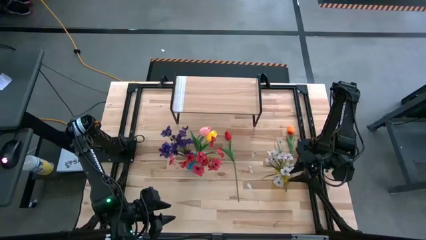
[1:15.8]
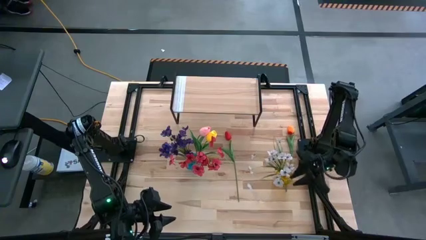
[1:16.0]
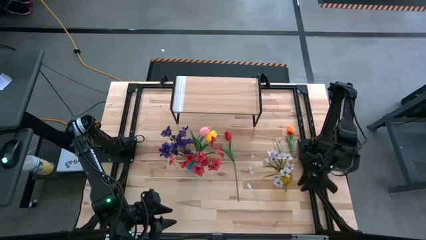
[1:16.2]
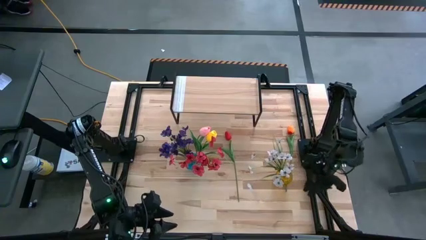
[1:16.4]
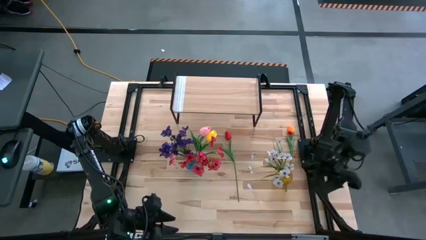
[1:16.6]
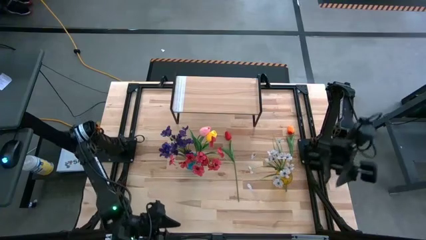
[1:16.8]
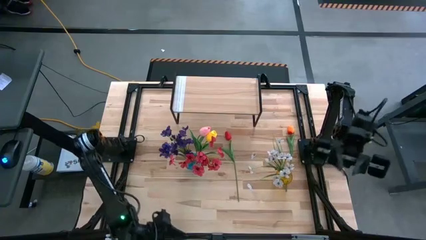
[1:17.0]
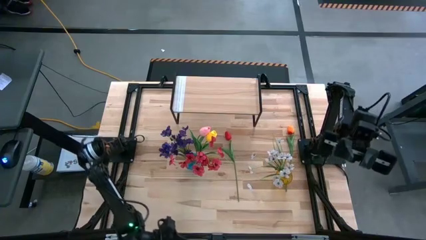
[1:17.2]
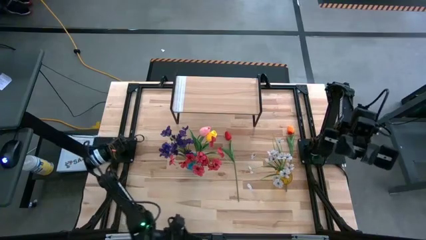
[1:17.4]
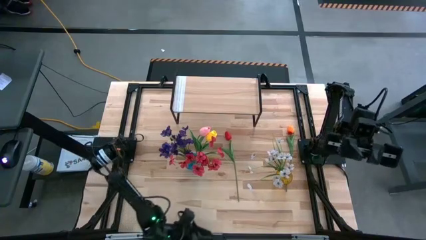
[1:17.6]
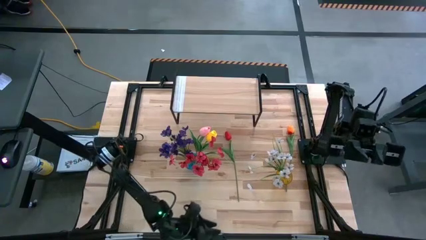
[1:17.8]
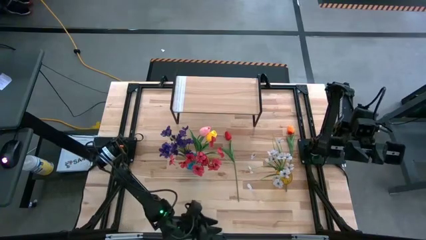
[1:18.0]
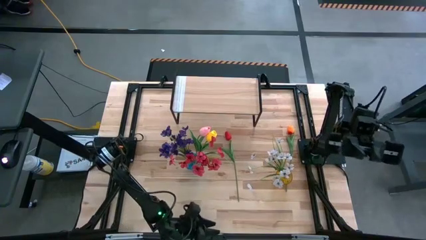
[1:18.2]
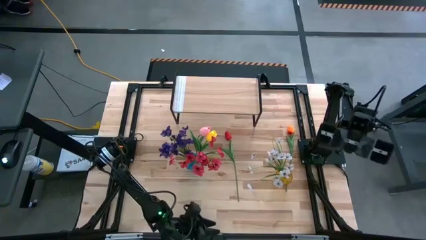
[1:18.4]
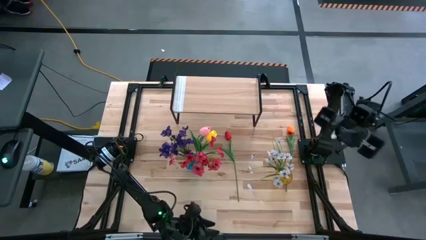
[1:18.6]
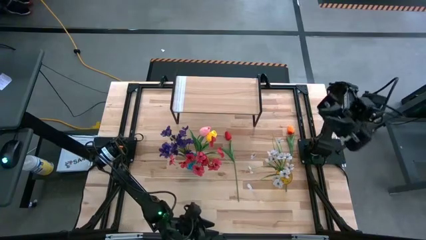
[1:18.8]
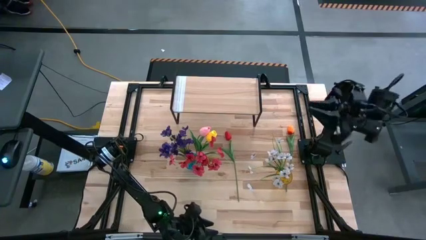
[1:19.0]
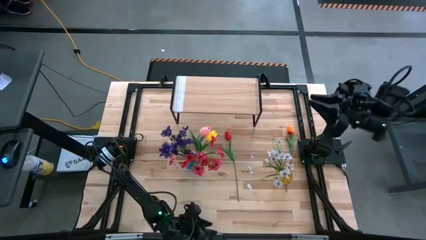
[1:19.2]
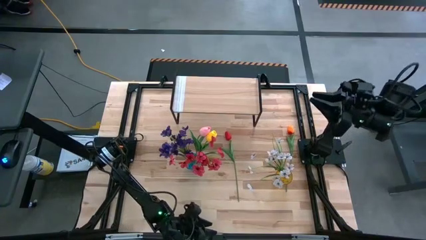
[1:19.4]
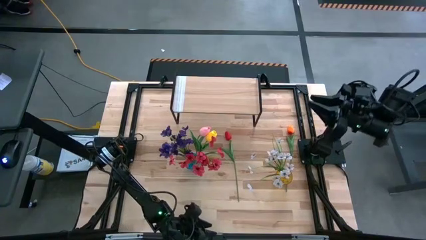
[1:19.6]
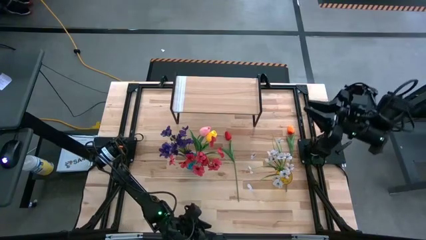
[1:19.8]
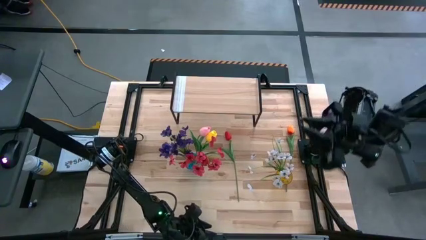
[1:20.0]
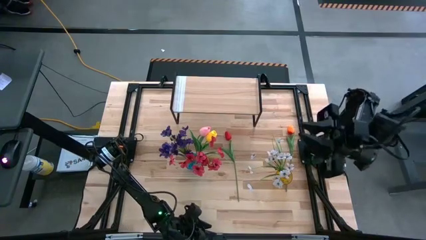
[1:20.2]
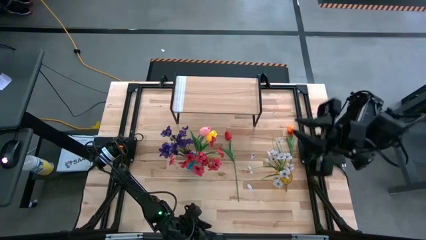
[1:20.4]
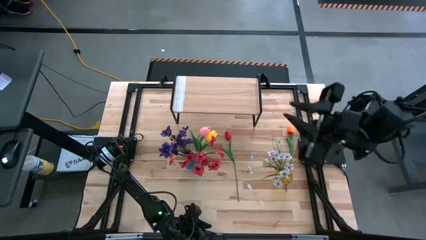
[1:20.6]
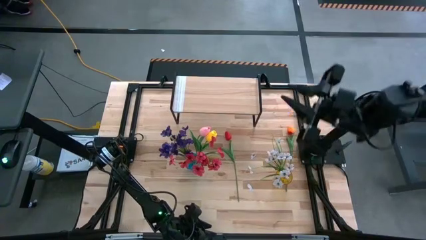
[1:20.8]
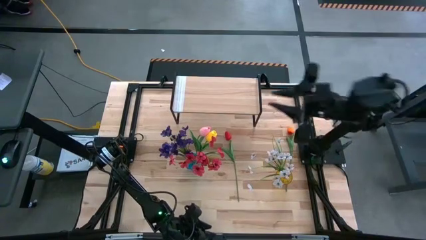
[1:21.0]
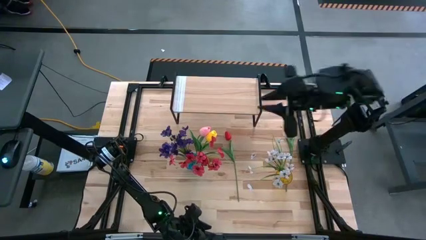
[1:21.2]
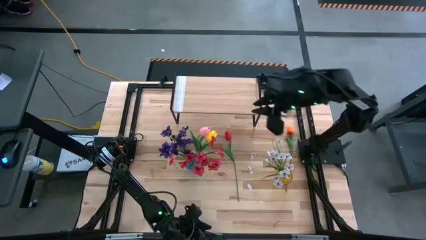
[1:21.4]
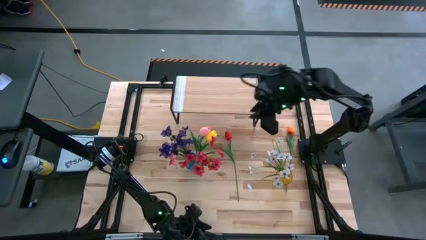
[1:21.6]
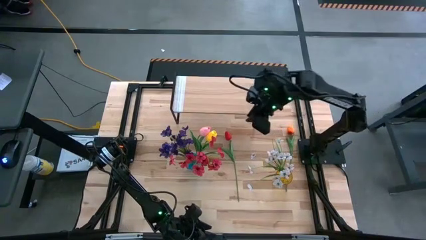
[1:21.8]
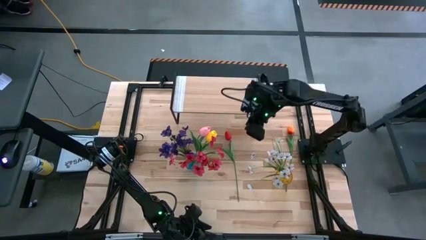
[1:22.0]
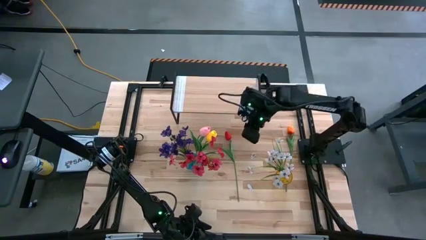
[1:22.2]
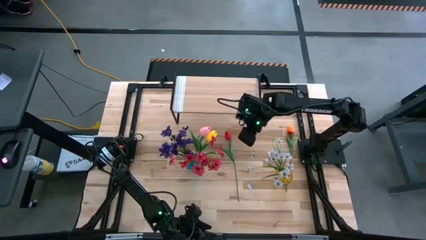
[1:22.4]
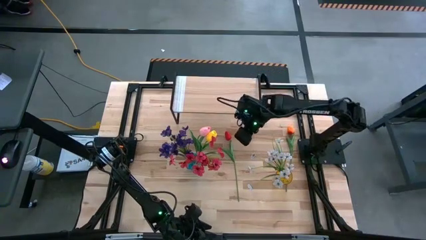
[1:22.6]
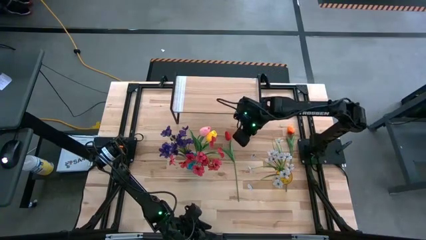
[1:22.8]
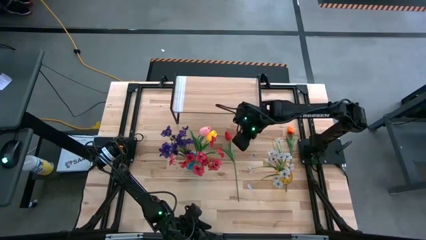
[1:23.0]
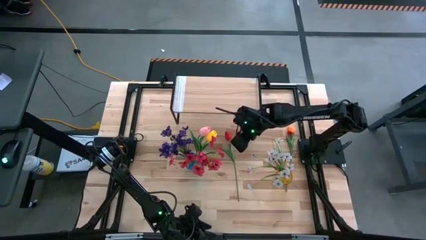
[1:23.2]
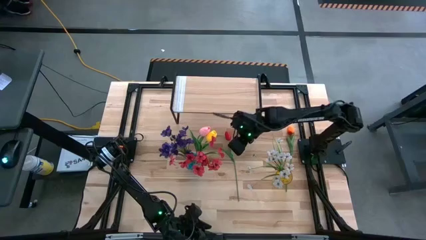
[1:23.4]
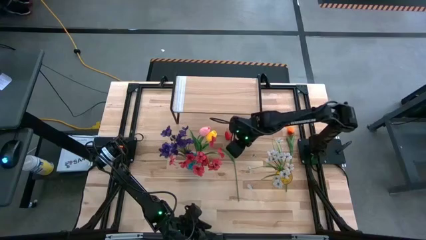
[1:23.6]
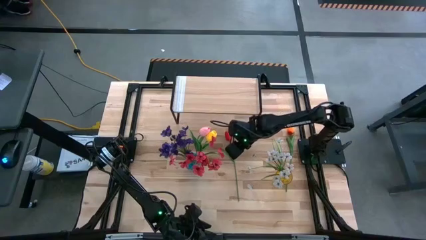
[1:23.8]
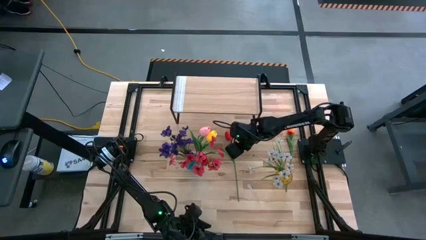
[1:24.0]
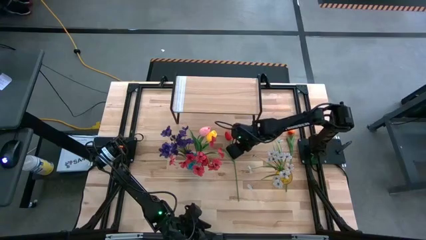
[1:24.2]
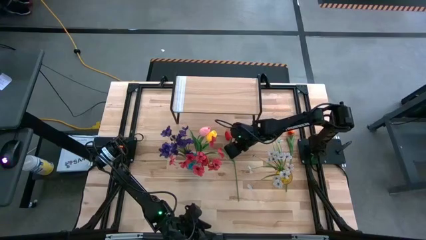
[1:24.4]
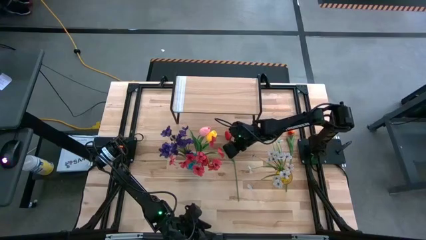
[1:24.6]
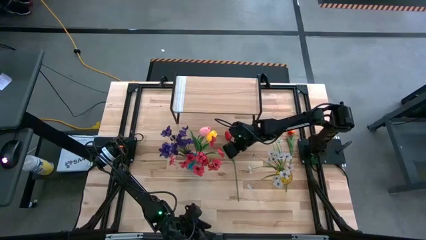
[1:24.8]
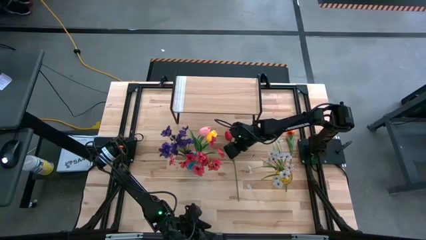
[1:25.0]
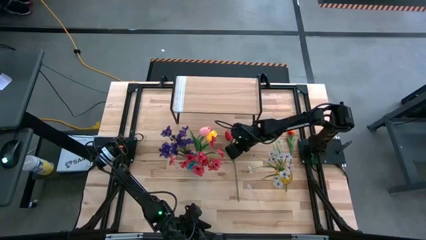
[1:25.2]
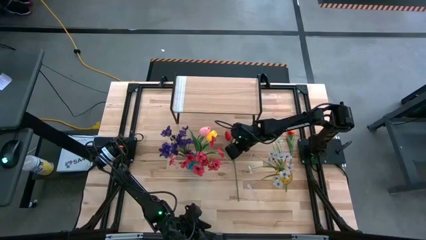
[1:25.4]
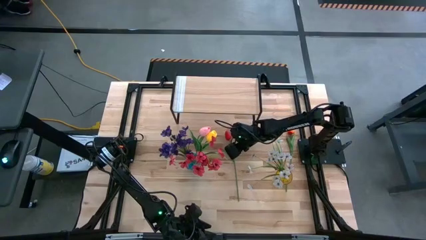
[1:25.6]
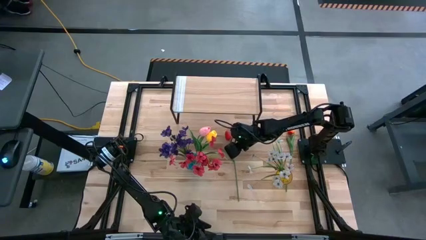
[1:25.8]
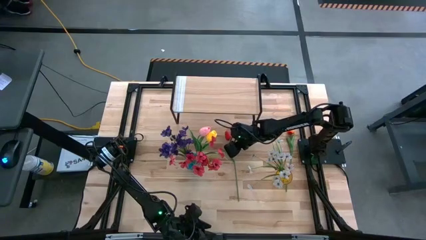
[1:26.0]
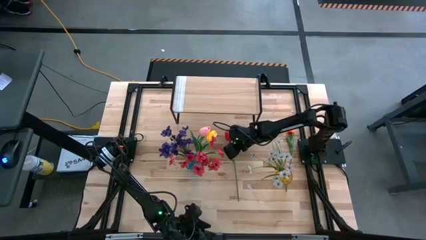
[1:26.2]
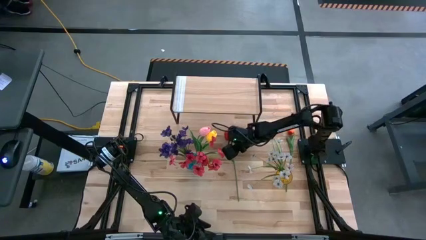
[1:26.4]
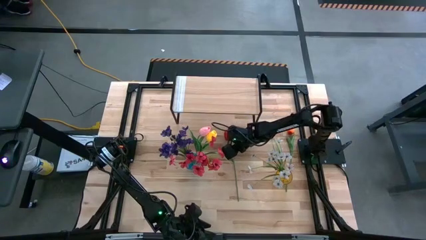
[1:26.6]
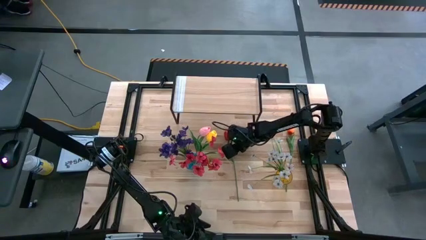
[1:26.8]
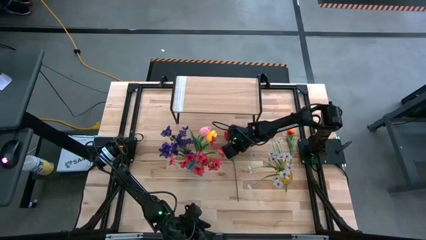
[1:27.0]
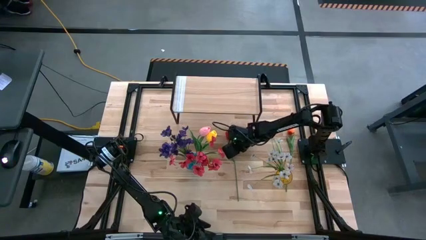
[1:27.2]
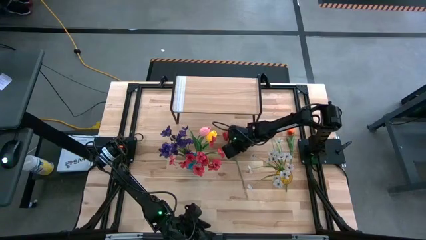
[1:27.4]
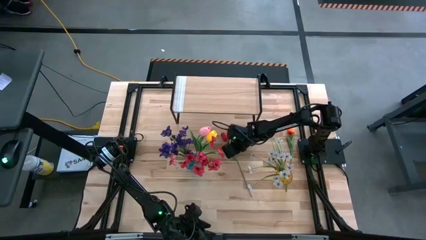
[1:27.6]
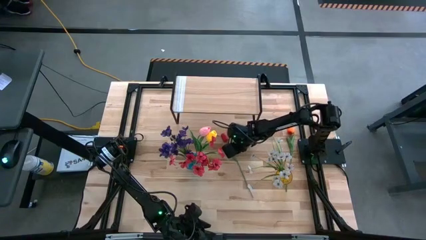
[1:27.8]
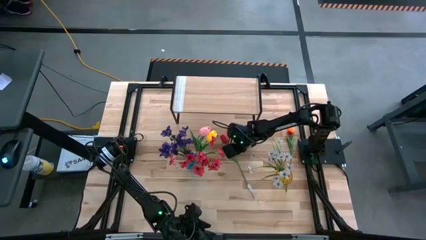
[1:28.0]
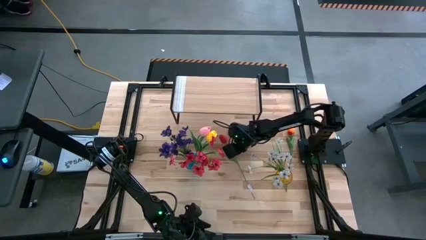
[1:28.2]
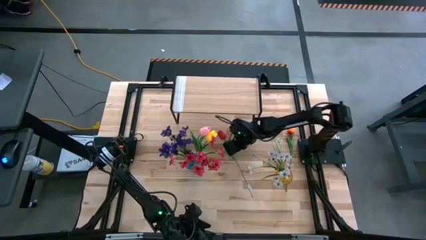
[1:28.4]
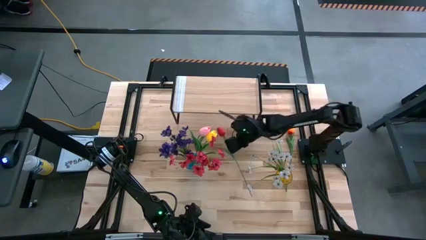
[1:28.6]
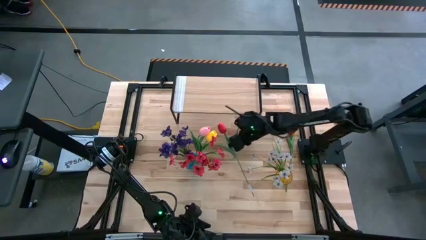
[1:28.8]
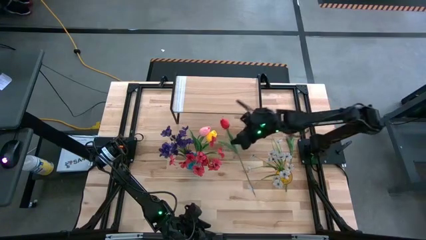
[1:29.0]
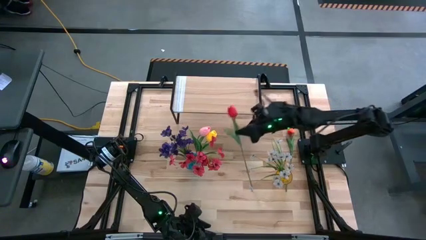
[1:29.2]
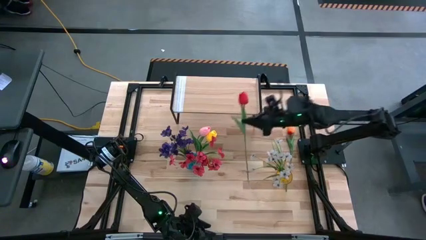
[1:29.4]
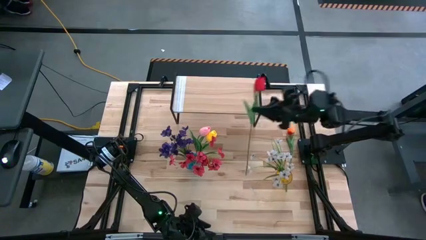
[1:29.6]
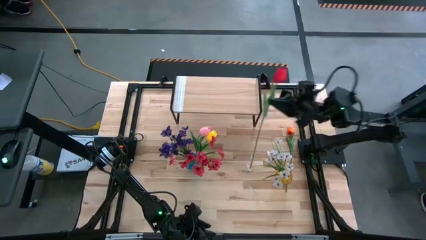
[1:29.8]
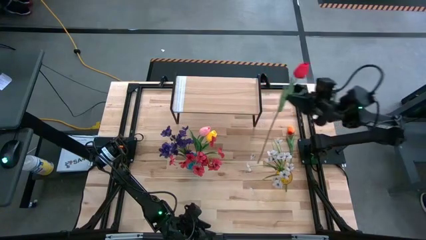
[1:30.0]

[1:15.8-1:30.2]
Task: Pick and place flowers into a vace then onto a shelf
Put the red flower into the yellow vase
